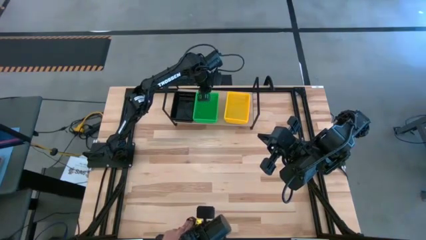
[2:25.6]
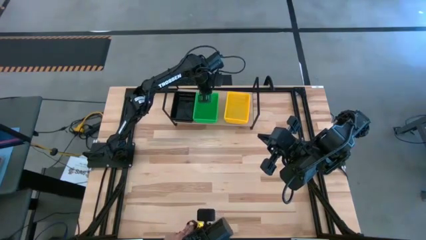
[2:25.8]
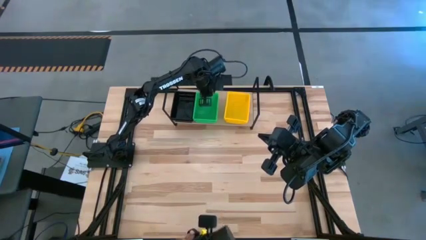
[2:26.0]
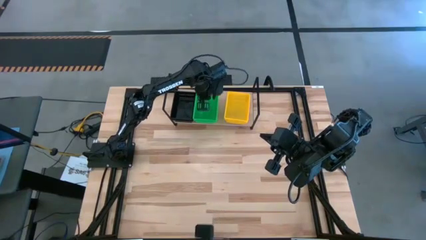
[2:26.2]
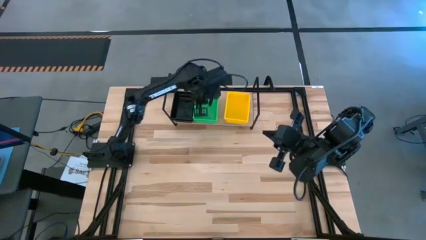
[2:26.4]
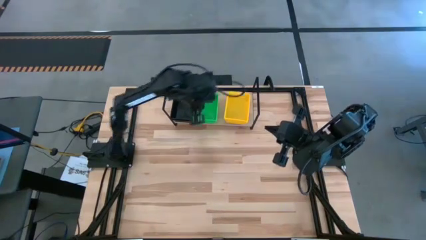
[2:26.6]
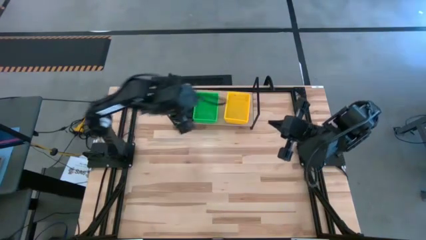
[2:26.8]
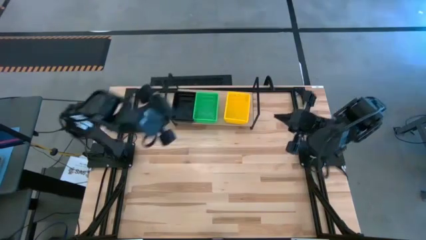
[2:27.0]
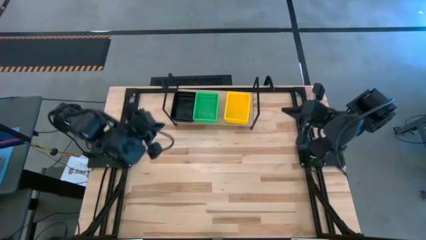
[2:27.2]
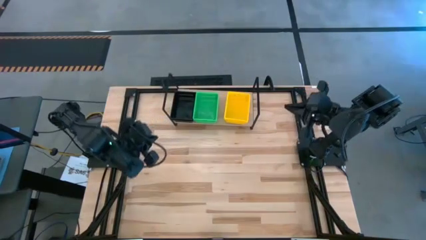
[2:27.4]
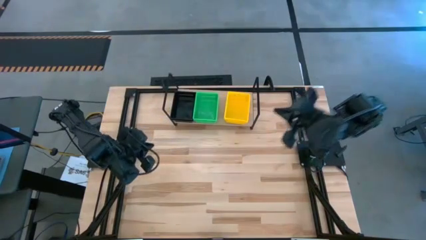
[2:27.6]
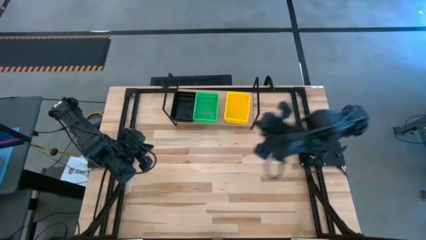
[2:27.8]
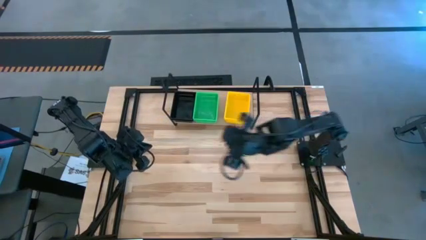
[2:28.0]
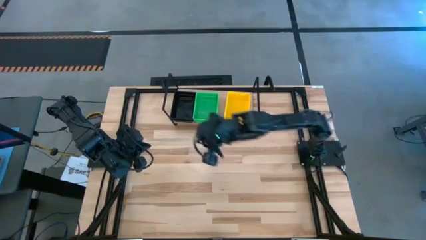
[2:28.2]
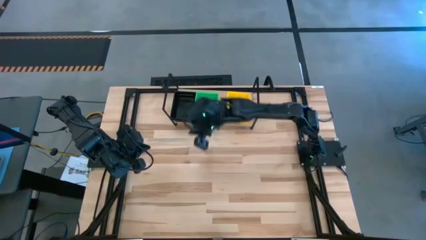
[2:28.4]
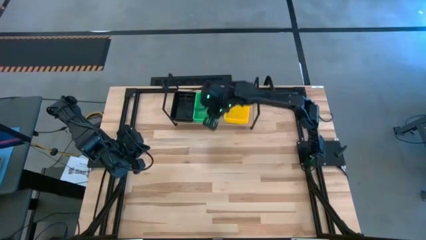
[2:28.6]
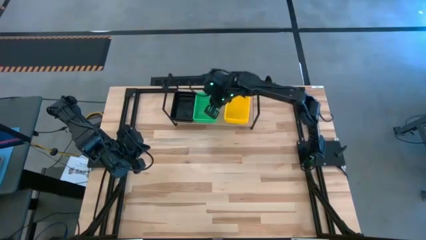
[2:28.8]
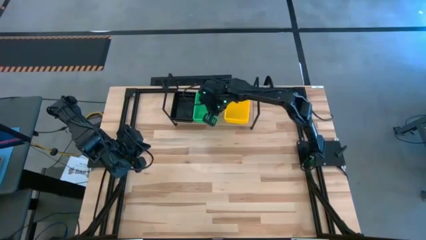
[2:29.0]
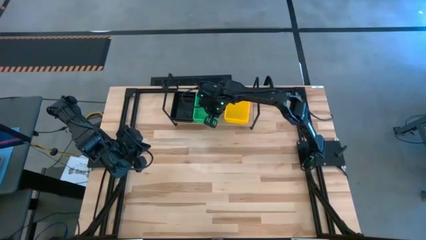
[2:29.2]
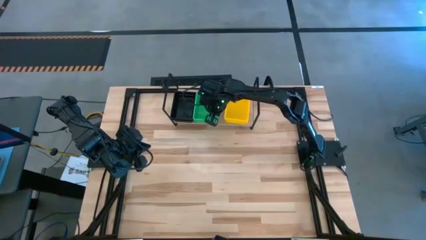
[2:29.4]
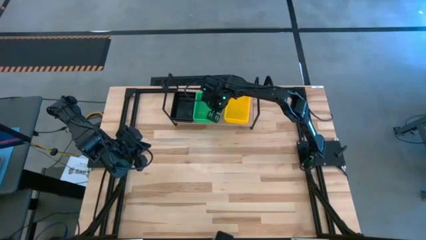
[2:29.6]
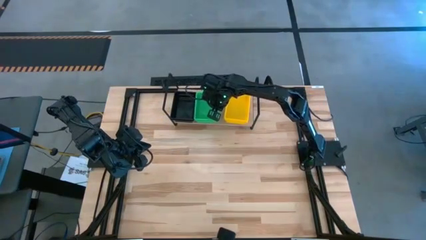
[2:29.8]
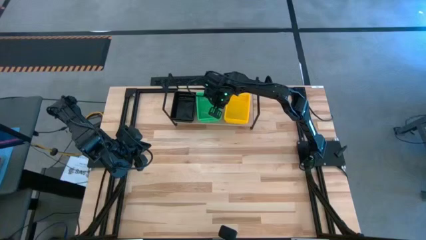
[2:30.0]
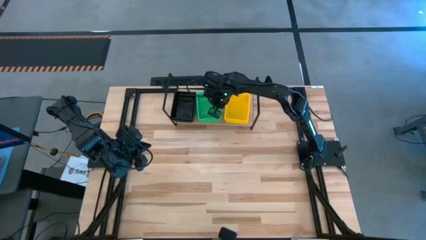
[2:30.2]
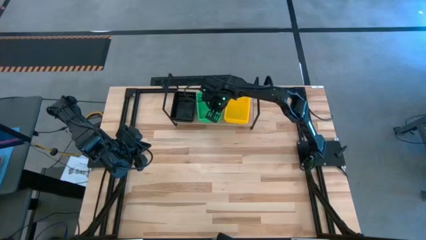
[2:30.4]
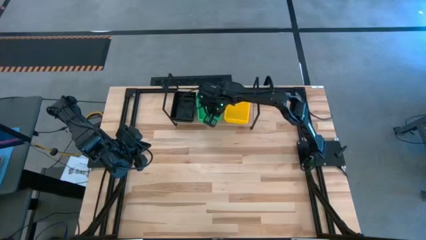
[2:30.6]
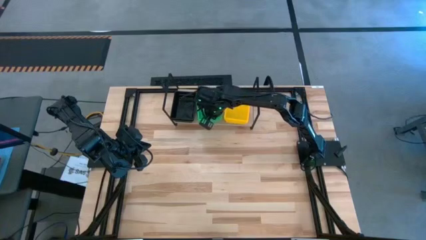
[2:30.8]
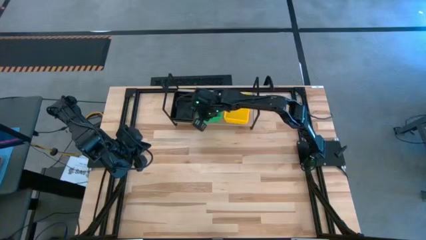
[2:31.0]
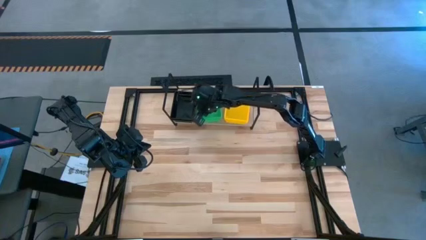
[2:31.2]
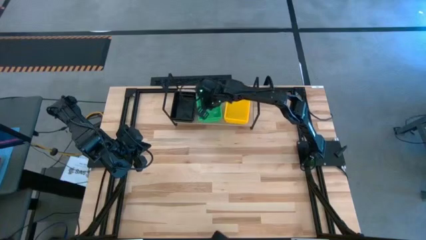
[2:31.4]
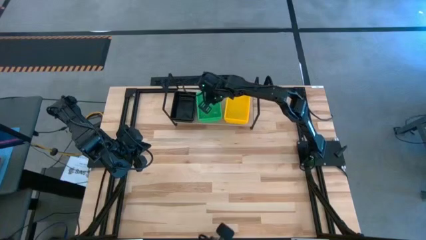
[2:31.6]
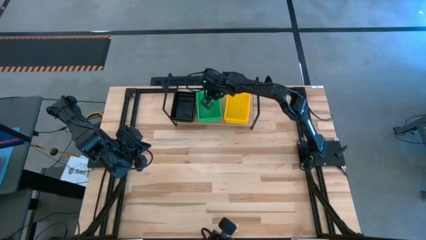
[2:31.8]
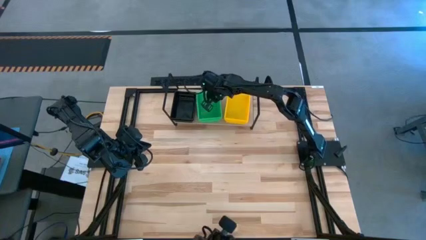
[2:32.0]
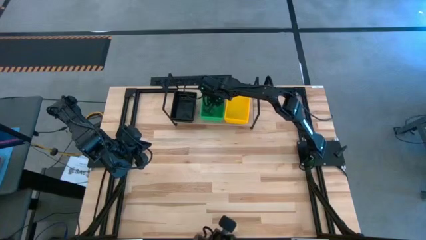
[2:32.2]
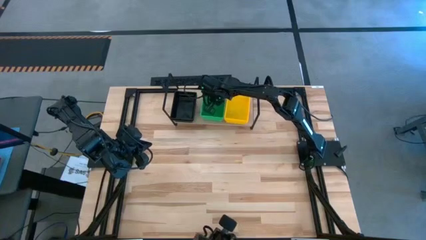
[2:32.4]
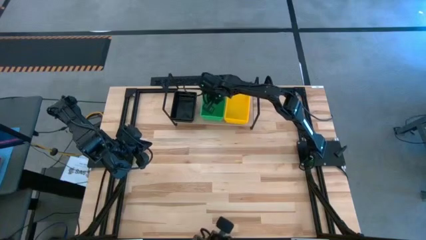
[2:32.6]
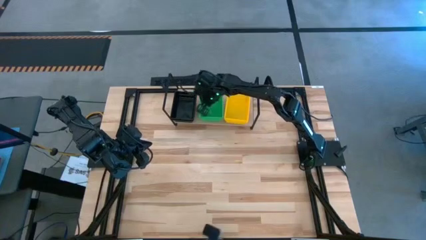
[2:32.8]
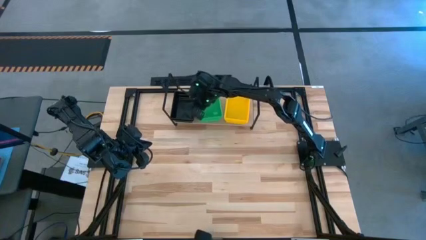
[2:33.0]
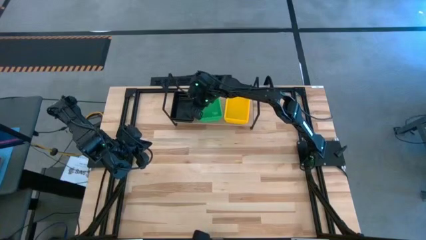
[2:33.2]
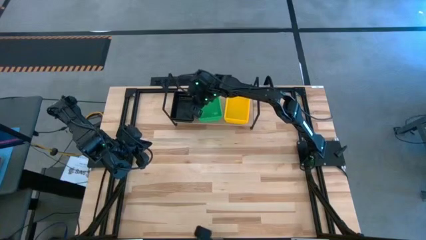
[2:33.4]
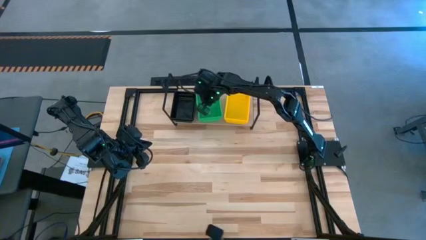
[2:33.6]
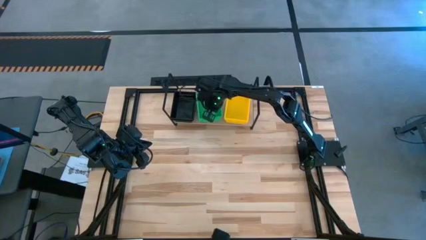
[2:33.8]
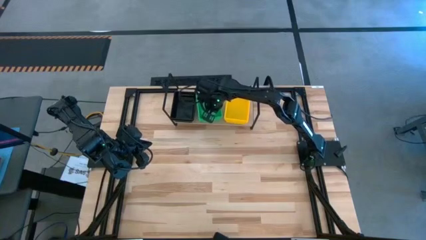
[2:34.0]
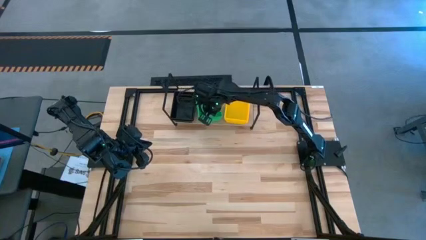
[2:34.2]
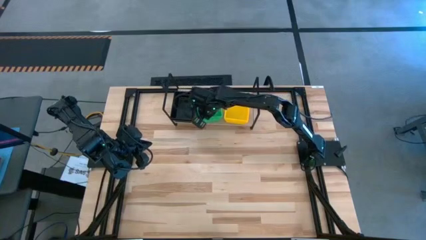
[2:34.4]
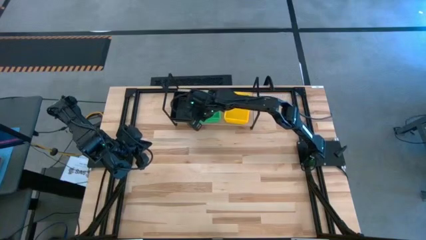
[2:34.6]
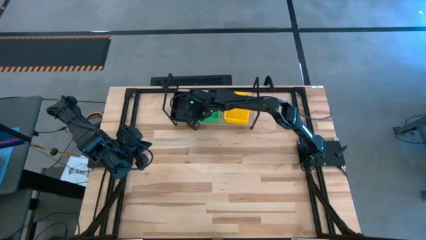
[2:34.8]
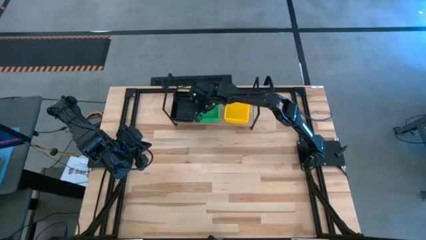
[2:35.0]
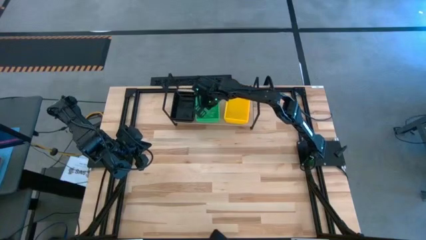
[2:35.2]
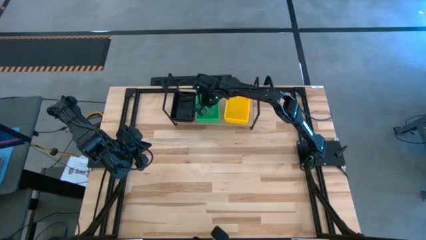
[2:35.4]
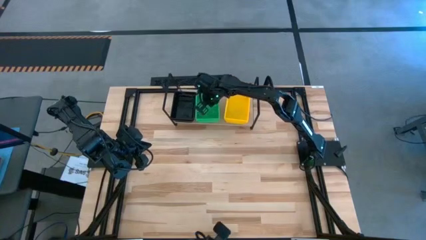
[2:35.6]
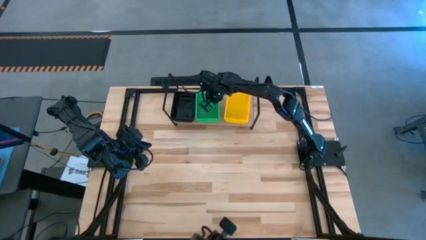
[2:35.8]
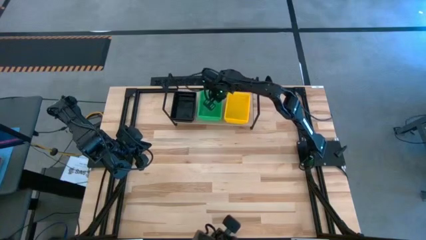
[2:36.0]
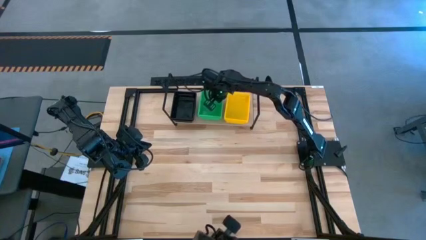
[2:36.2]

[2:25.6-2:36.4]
Task: Stack baskets on shelf by color
Adjust the green bins on the shelf

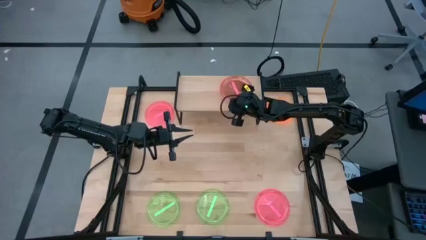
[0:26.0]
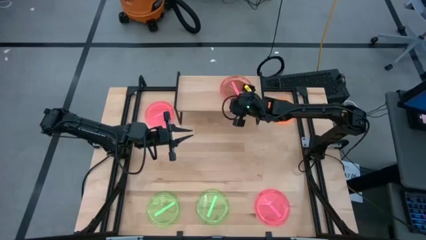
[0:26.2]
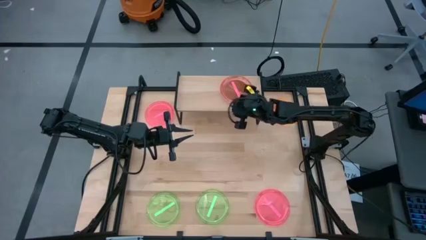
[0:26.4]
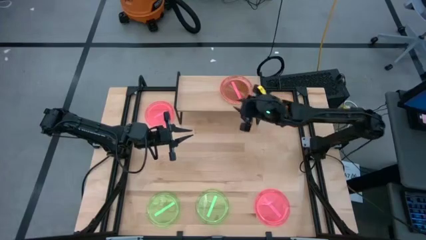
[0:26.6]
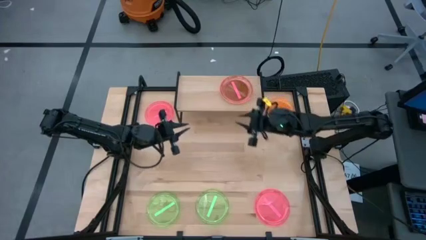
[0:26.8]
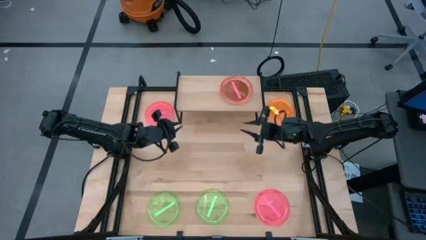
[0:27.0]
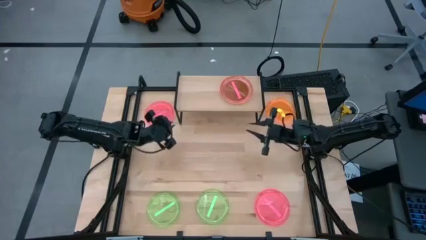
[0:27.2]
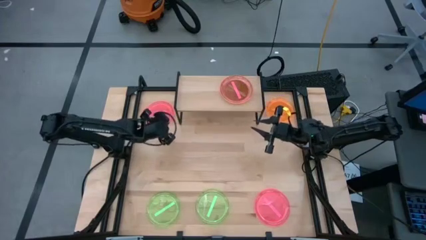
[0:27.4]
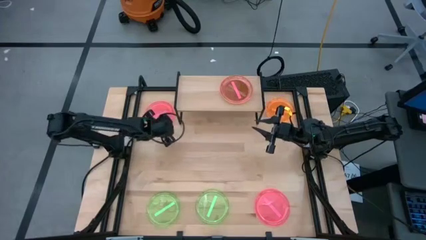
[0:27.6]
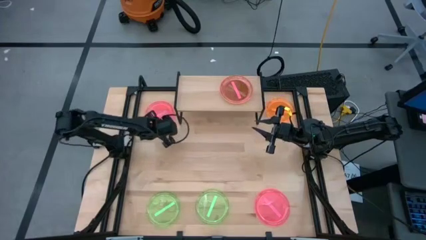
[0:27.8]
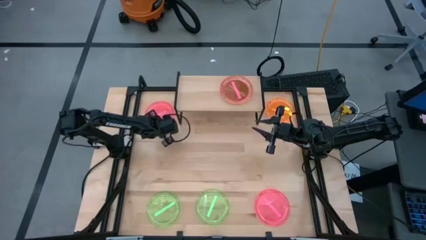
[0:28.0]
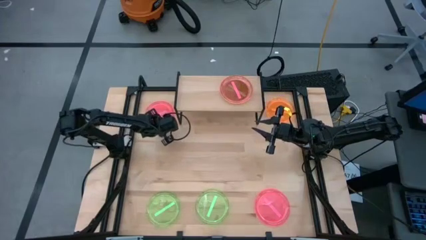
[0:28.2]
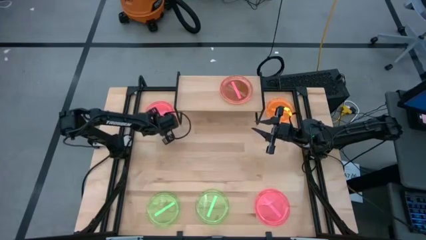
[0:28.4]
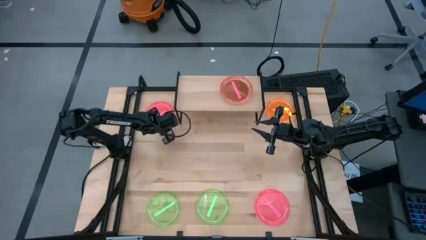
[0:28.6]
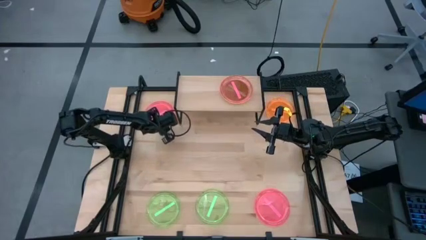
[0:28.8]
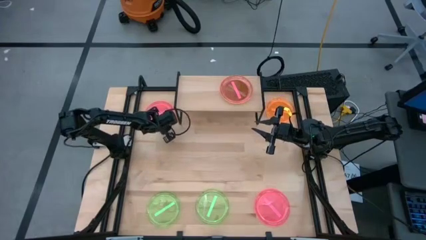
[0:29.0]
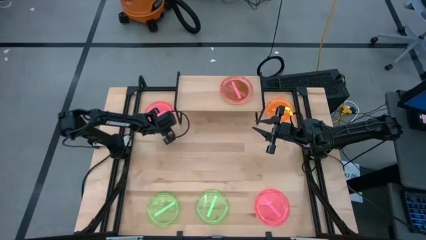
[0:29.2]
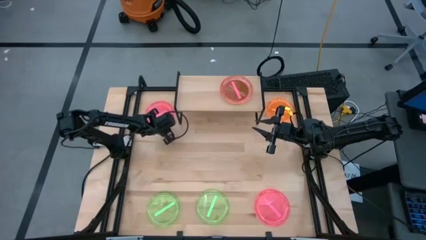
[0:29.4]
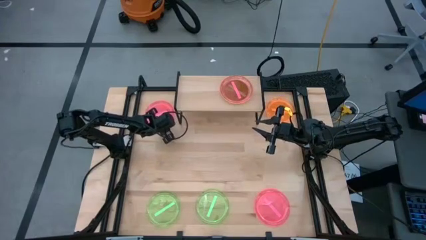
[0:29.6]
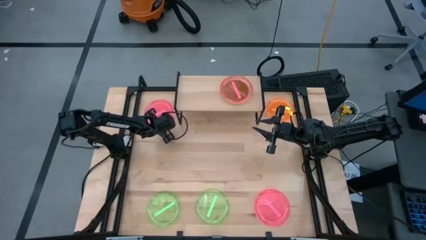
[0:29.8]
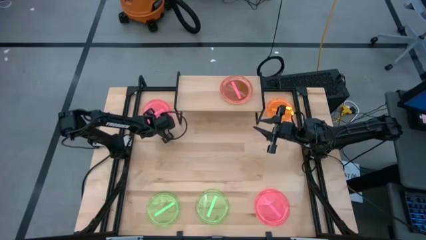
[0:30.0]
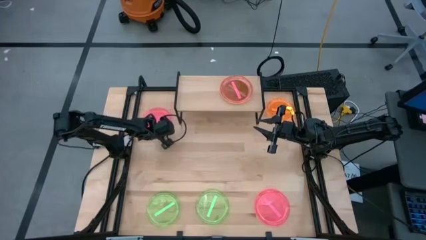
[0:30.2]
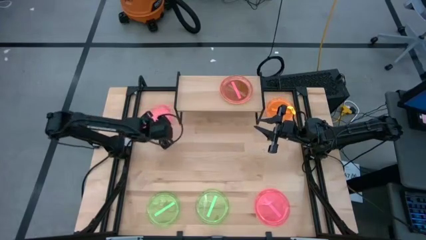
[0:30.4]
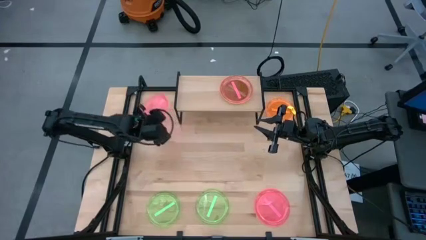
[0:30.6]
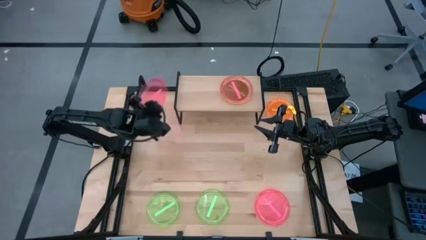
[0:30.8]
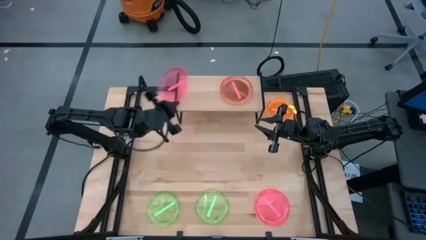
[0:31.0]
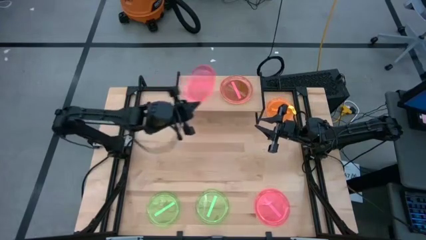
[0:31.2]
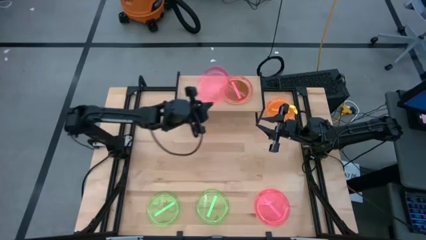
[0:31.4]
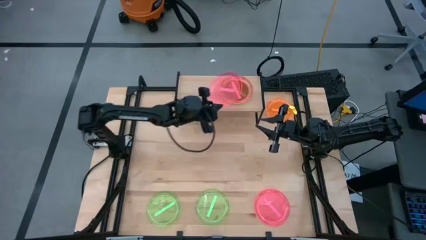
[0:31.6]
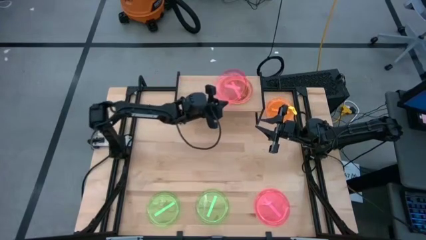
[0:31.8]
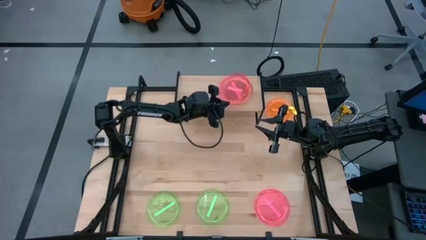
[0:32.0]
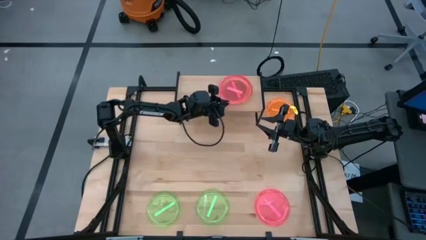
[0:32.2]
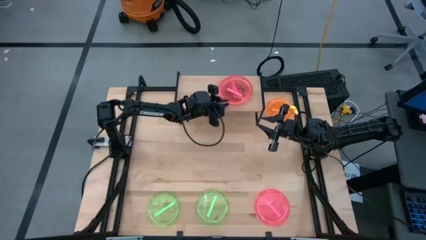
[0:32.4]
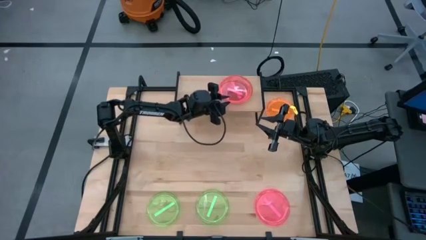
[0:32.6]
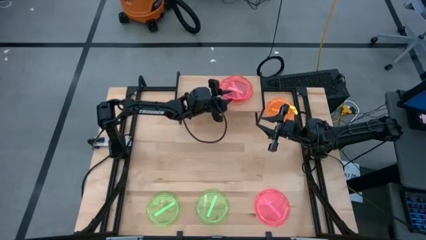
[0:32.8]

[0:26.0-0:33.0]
Task: Place and stack plates onto a shelf
Stack the pink plate on top of the pink plate on the shelf
